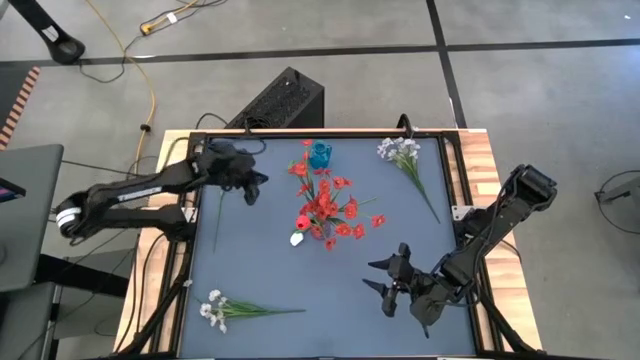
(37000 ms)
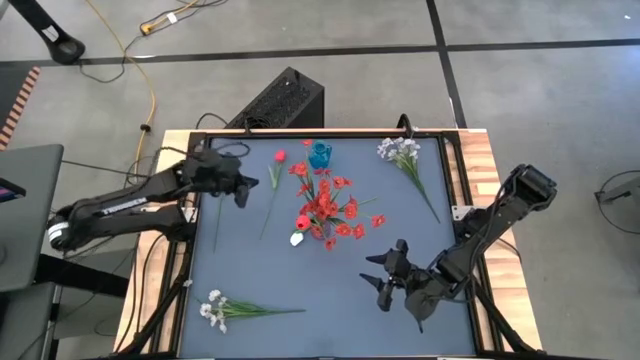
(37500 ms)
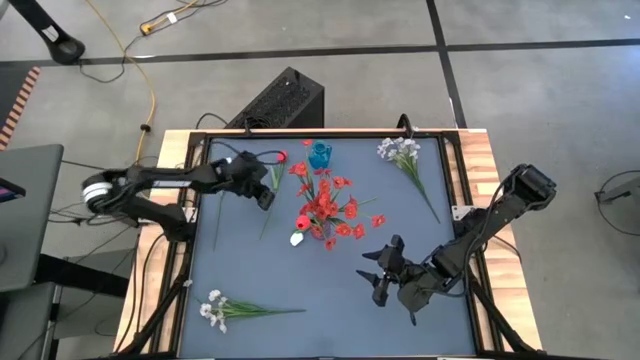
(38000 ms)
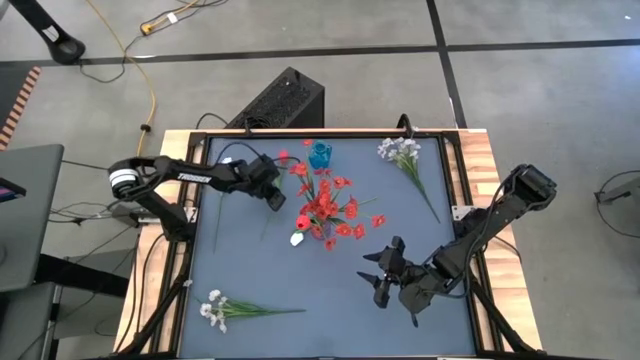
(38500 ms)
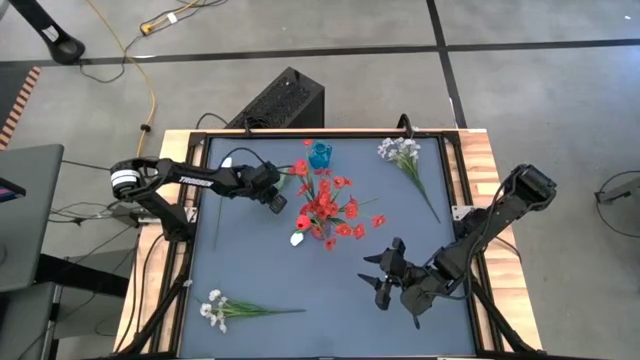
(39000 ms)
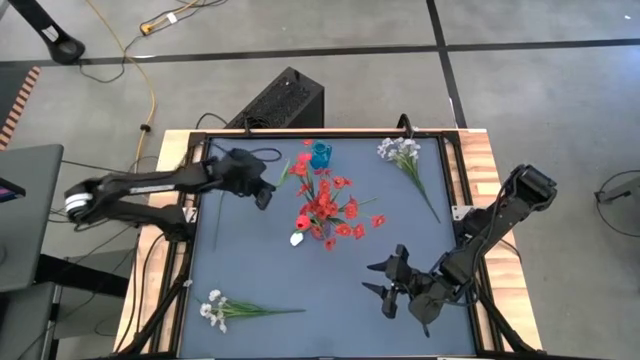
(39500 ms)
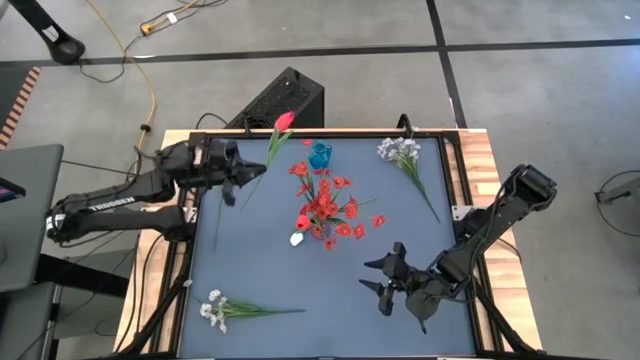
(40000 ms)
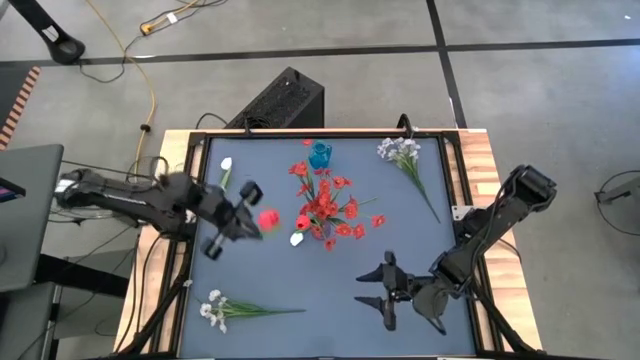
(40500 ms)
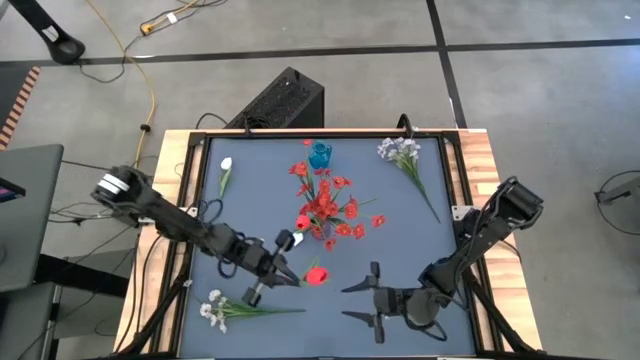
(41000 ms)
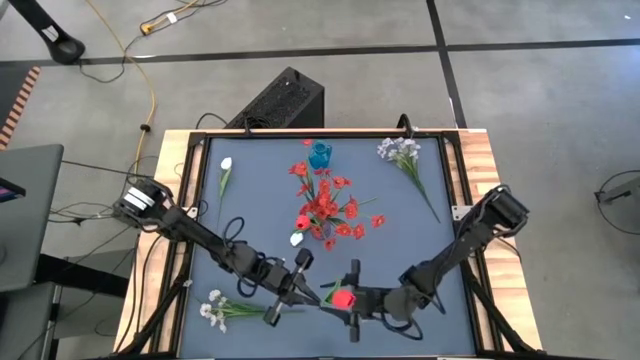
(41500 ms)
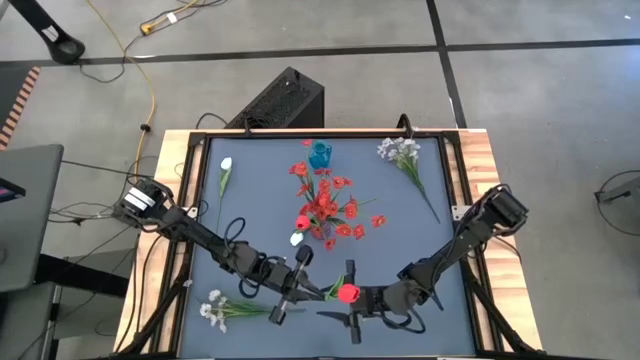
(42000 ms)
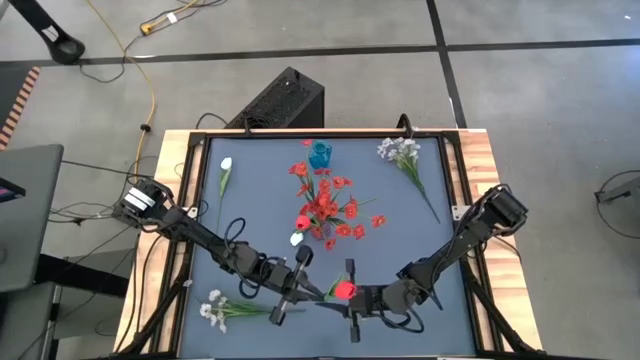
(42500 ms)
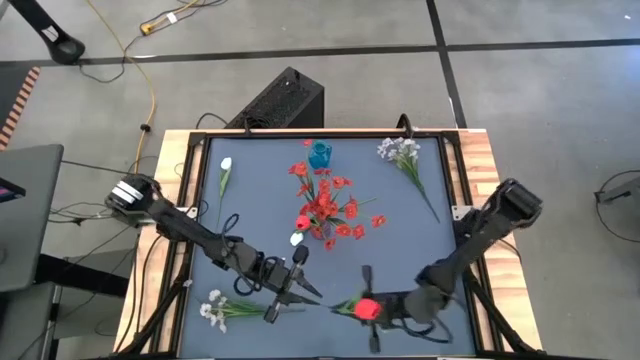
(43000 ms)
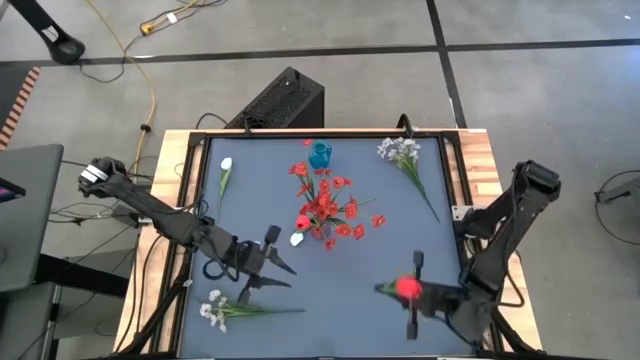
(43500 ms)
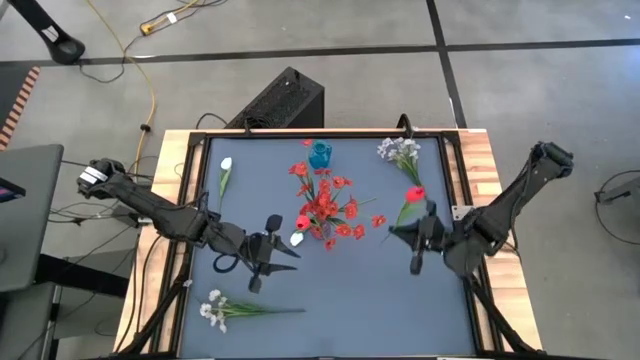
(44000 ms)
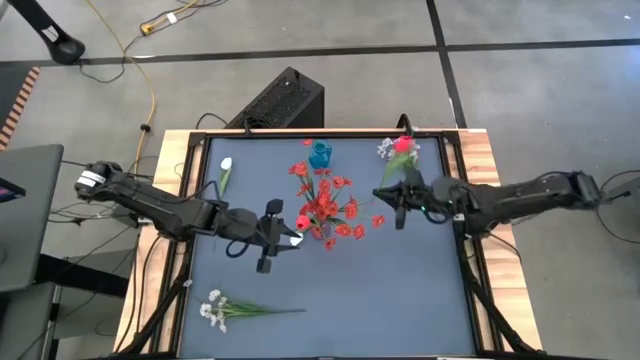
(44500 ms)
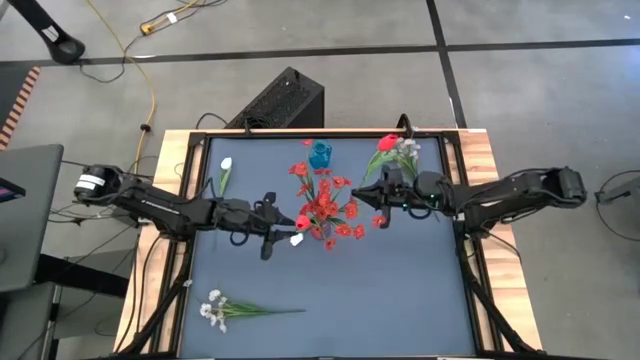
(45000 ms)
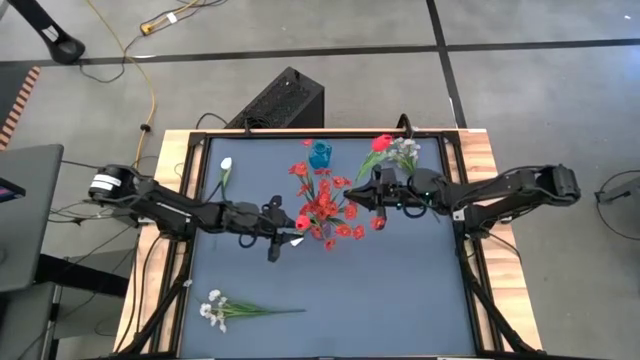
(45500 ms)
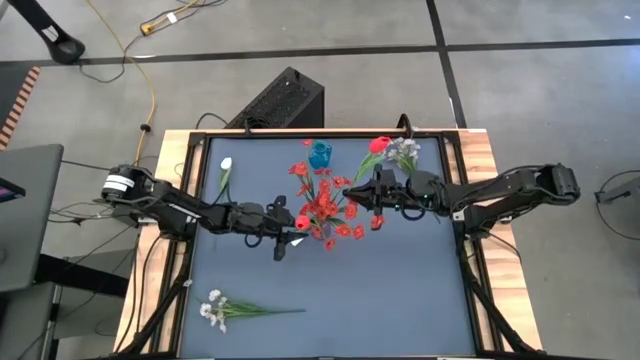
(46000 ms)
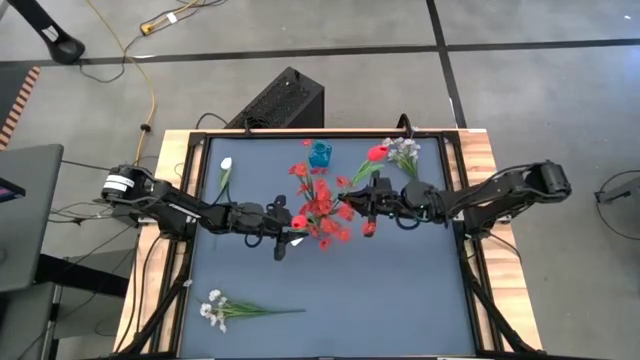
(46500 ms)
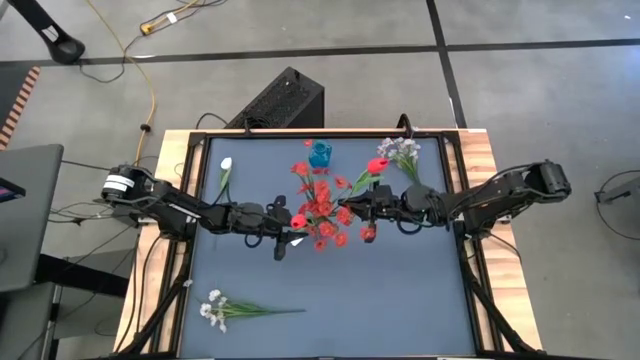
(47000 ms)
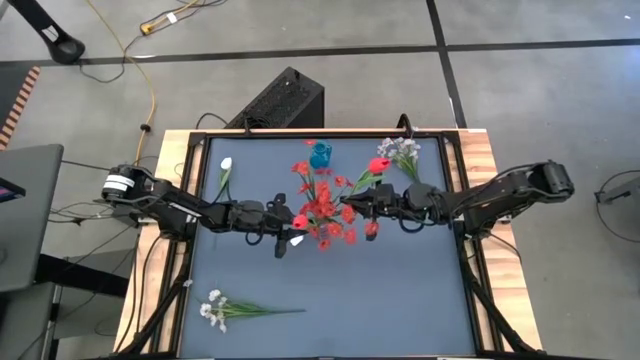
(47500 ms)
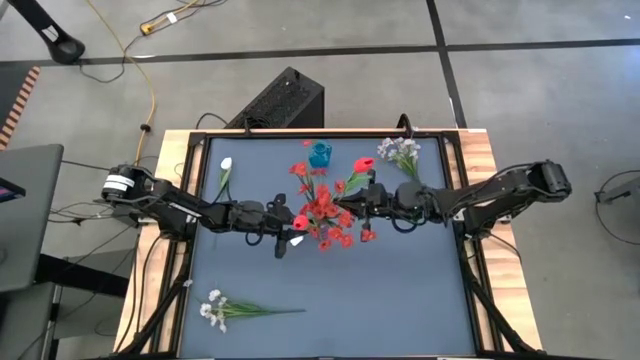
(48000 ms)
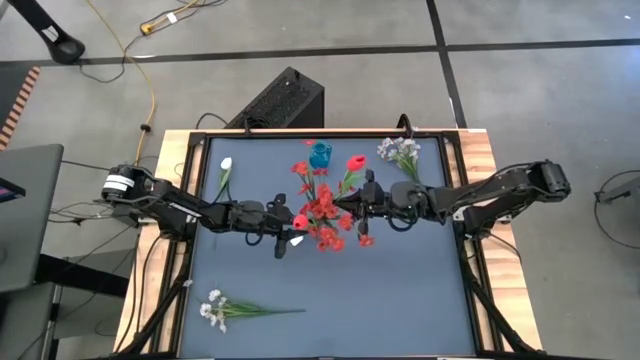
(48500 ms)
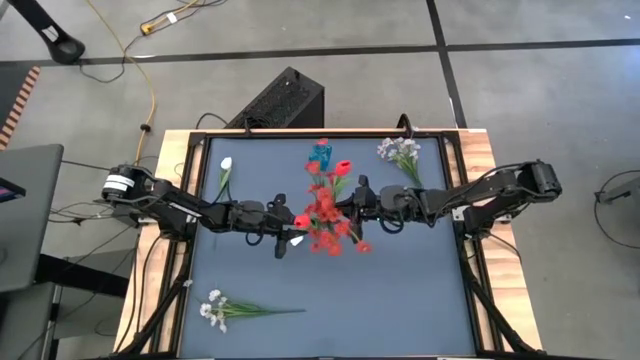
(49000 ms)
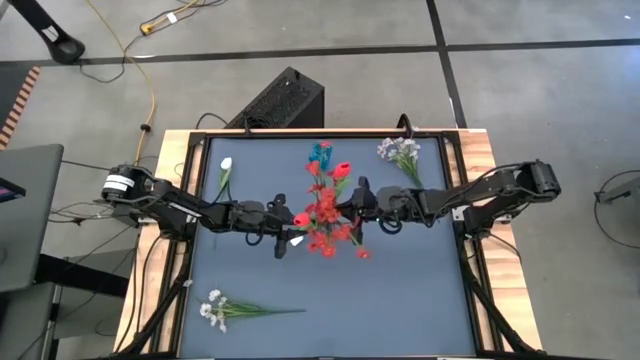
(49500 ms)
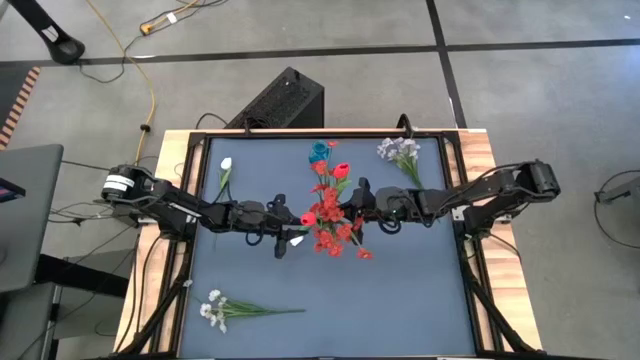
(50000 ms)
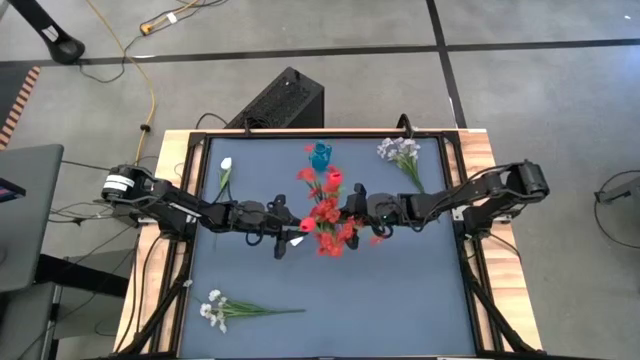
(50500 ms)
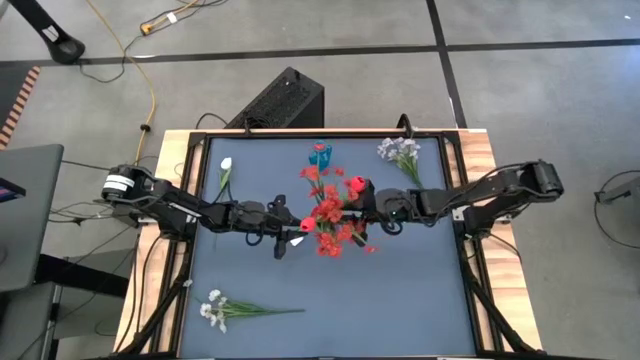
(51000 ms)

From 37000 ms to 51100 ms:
Task: Sort flowers into vase by color
Put the red tulip into the violet vase

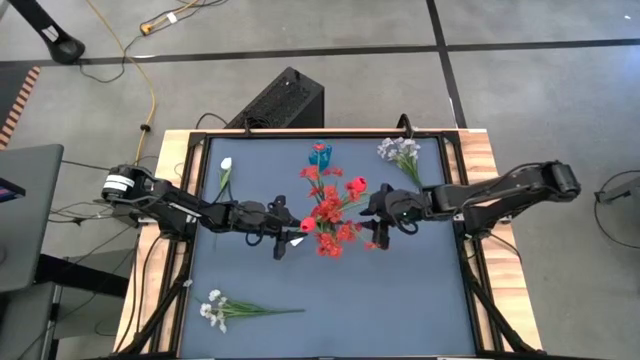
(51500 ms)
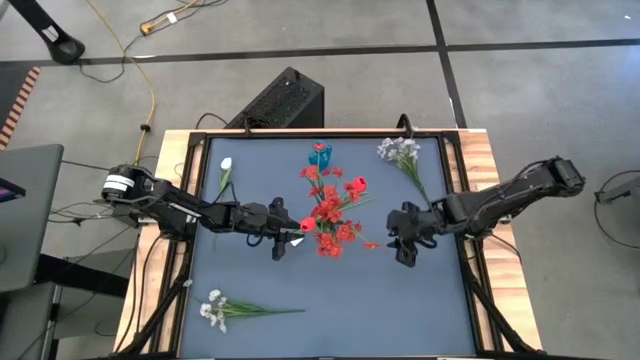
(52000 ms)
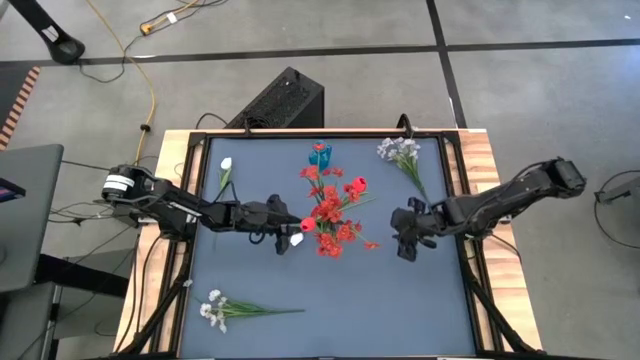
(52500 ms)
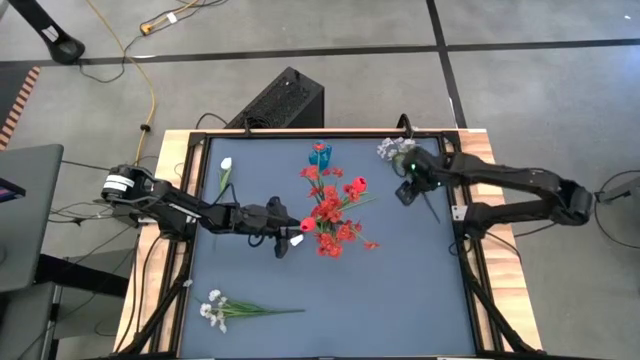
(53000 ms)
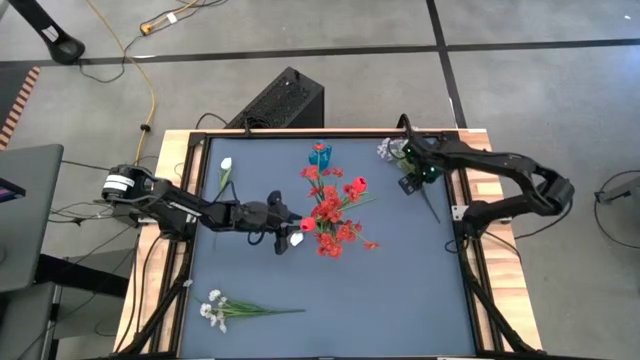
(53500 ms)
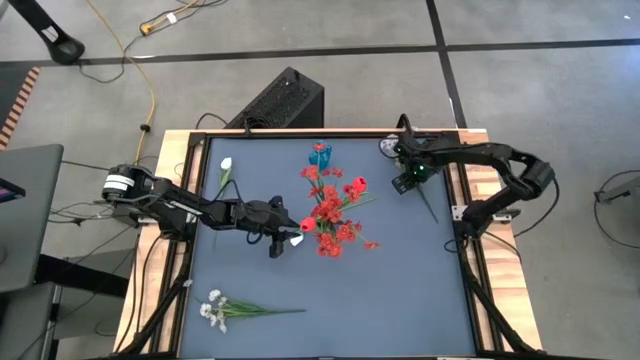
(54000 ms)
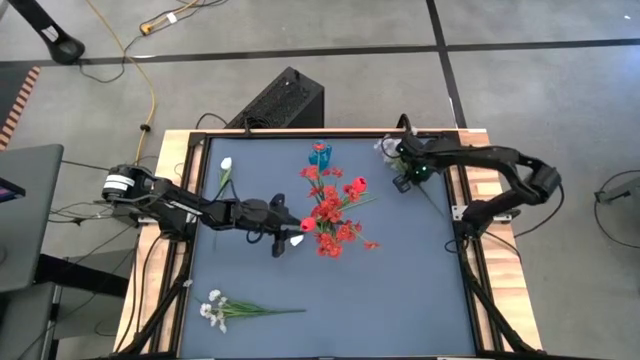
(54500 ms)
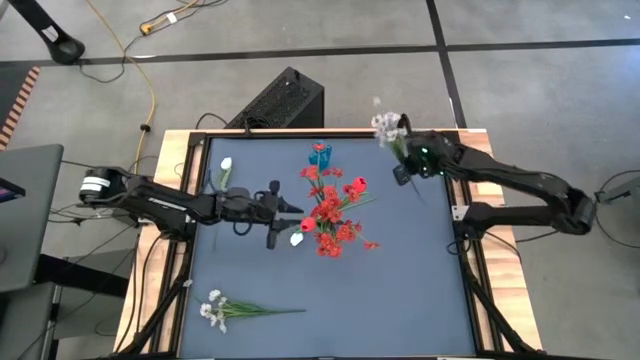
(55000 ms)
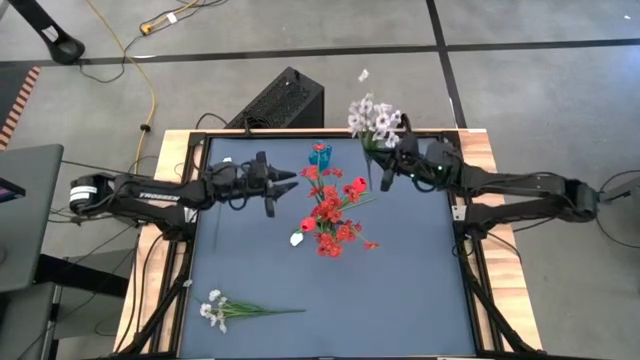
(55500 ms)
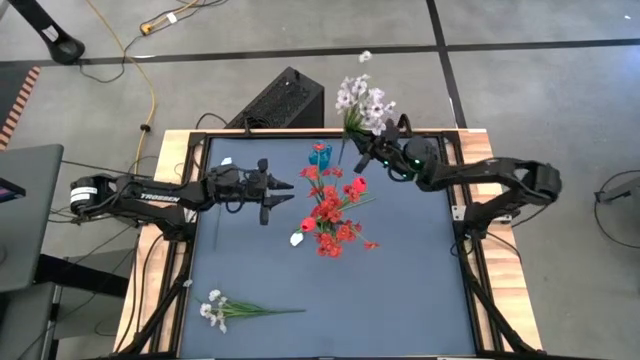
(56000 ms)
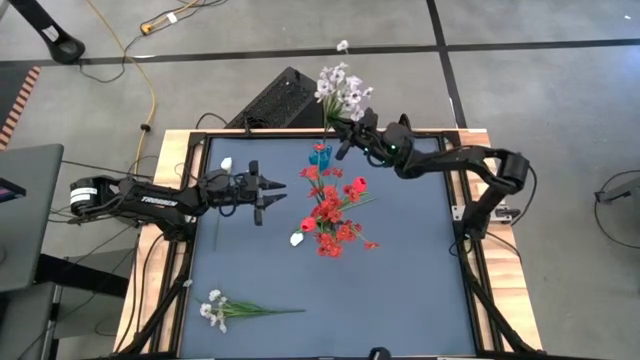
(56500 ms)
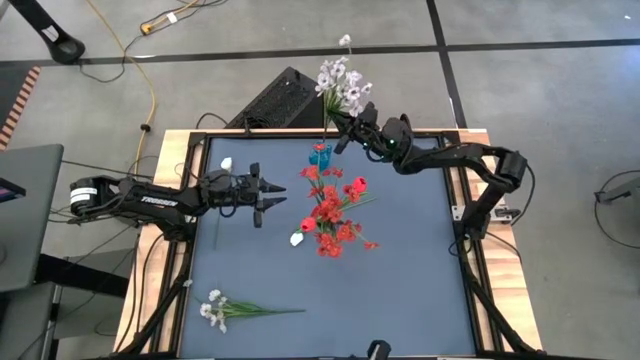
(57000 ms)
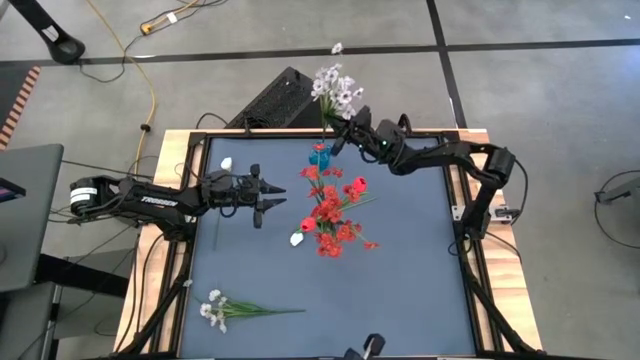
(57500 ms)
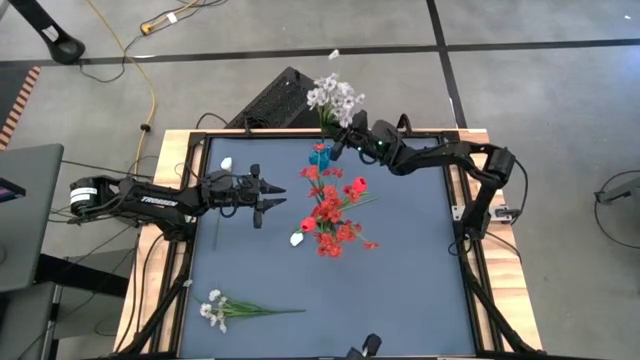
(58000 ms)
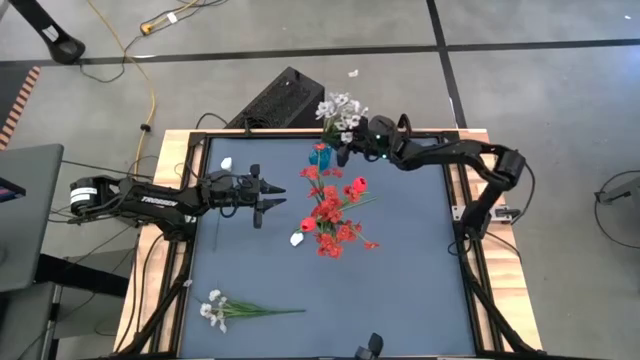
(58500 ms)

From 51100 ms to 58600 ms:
Put the top white flowers into the blue vase
